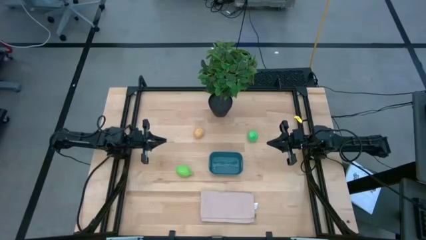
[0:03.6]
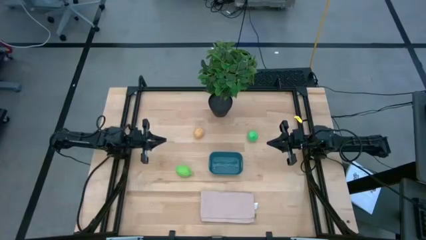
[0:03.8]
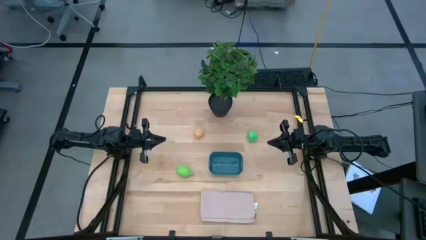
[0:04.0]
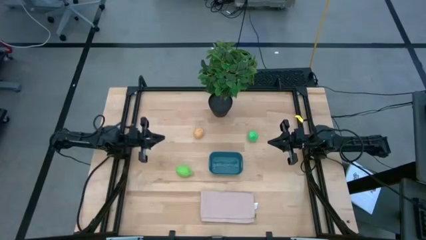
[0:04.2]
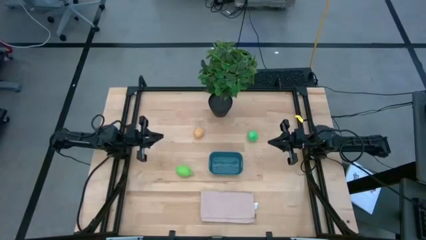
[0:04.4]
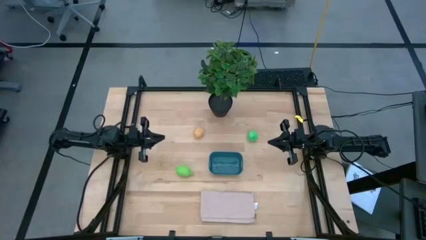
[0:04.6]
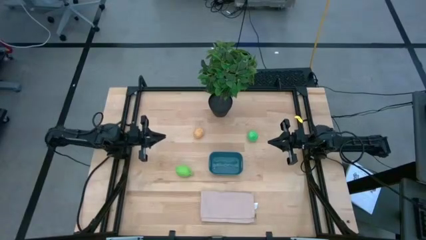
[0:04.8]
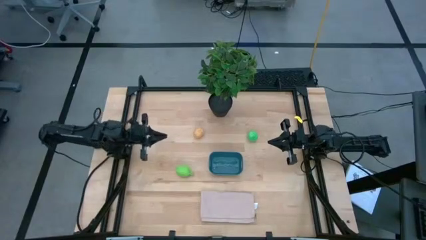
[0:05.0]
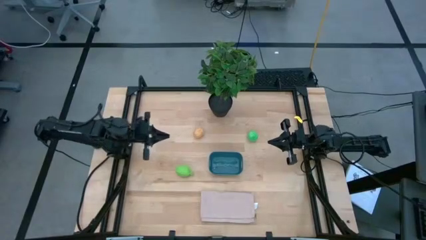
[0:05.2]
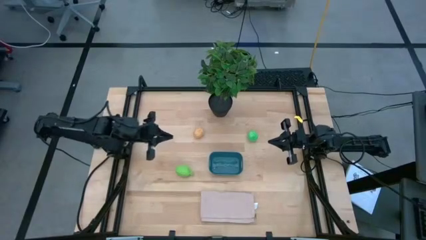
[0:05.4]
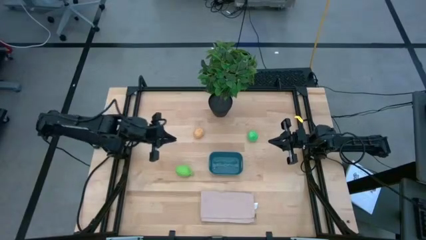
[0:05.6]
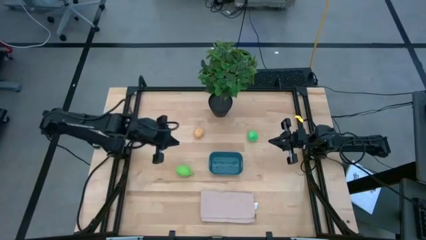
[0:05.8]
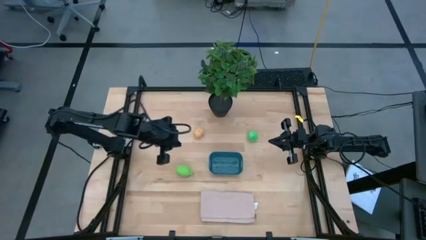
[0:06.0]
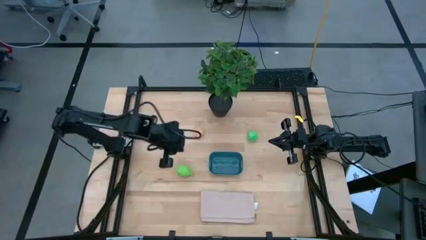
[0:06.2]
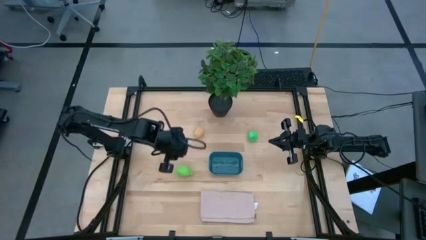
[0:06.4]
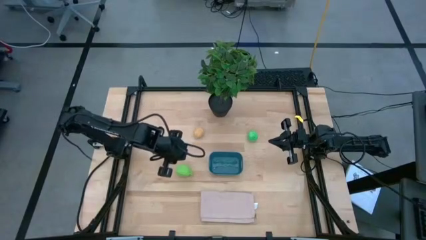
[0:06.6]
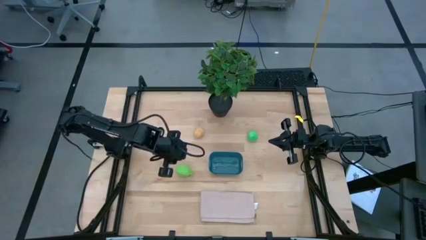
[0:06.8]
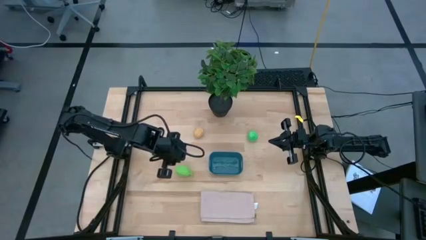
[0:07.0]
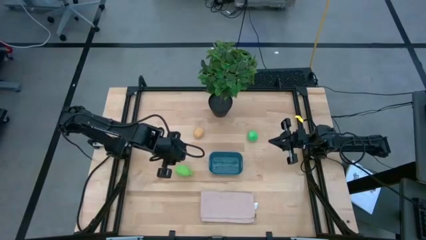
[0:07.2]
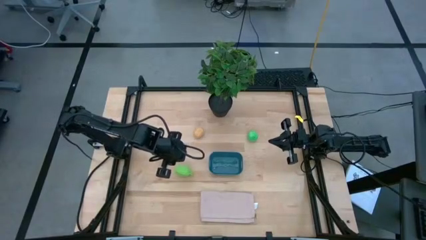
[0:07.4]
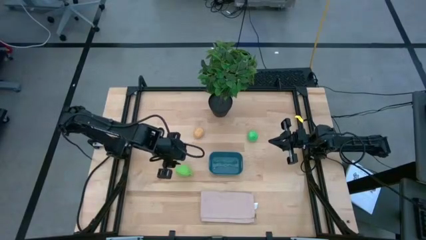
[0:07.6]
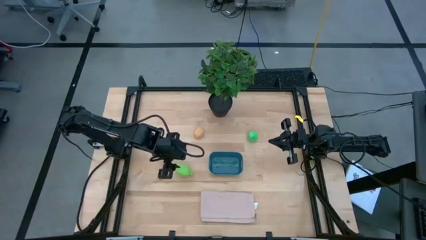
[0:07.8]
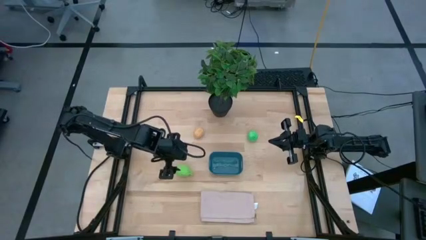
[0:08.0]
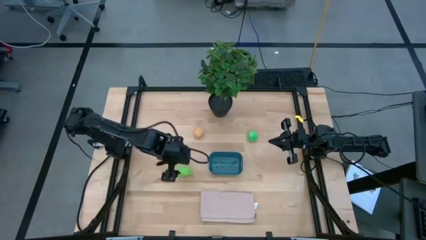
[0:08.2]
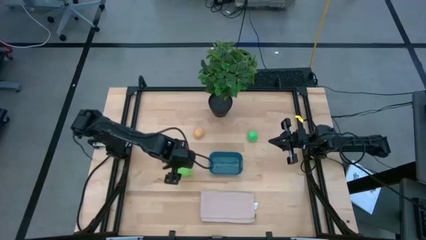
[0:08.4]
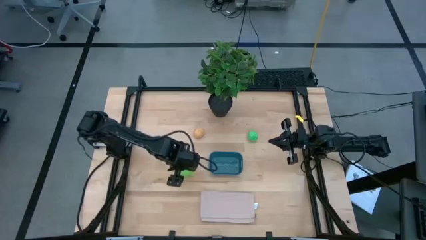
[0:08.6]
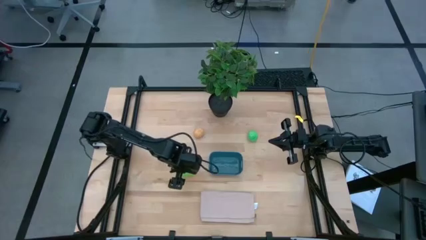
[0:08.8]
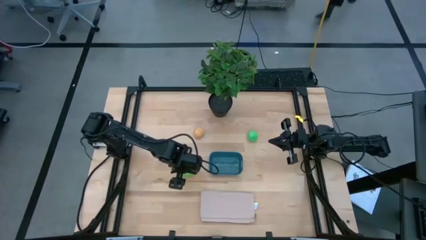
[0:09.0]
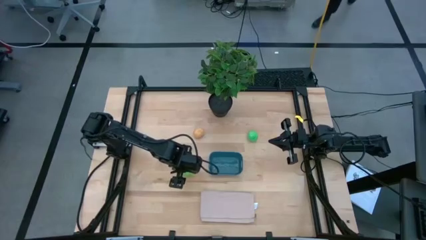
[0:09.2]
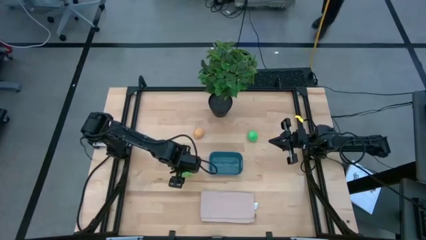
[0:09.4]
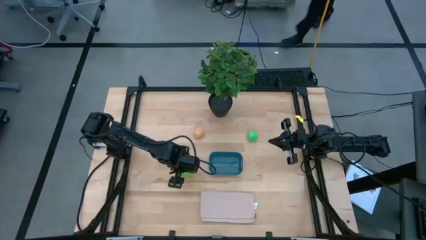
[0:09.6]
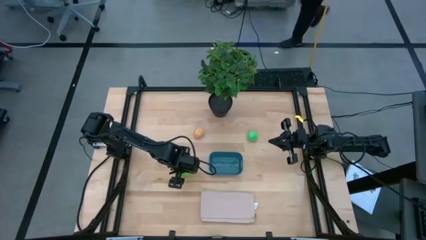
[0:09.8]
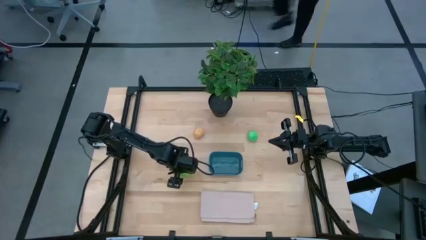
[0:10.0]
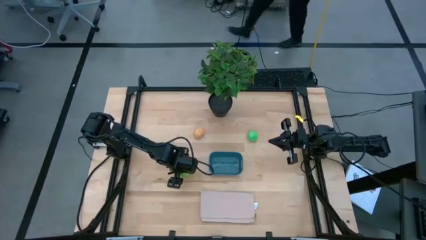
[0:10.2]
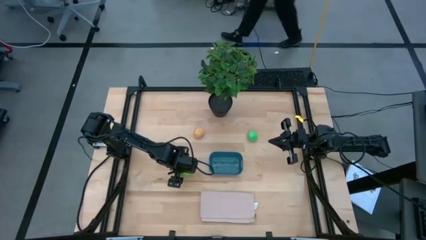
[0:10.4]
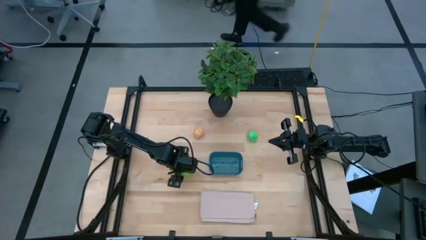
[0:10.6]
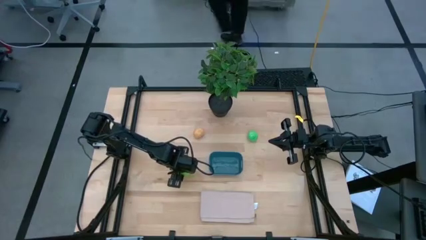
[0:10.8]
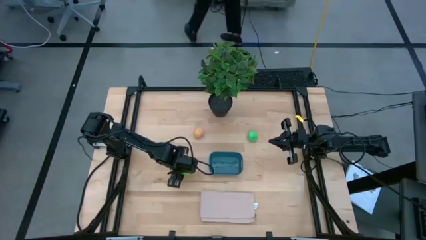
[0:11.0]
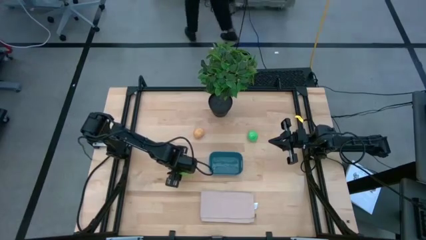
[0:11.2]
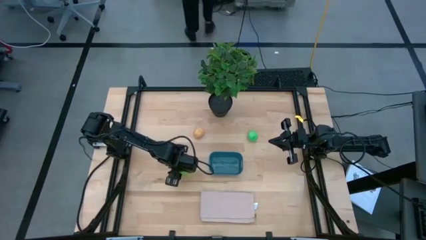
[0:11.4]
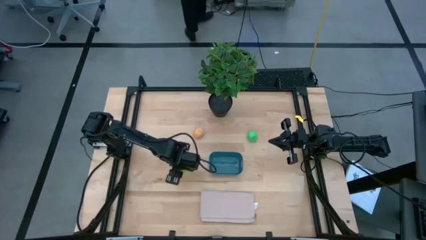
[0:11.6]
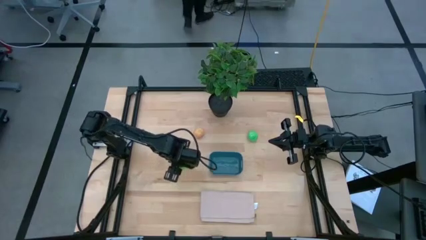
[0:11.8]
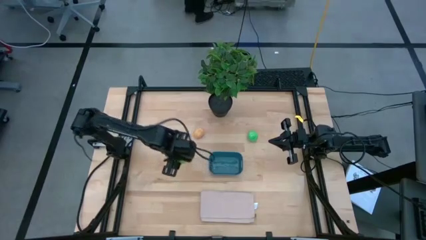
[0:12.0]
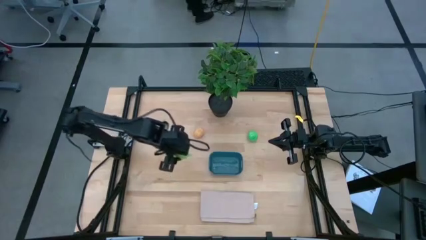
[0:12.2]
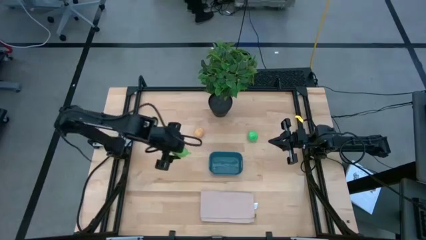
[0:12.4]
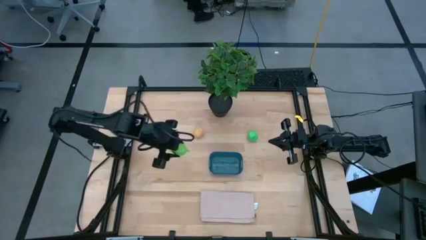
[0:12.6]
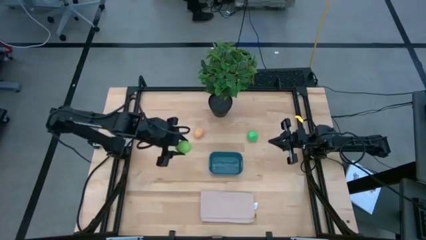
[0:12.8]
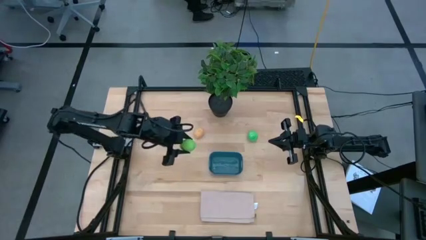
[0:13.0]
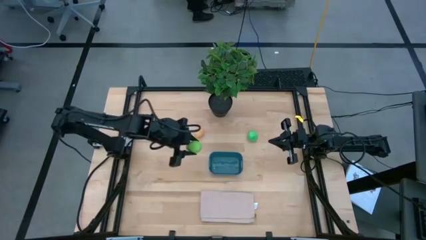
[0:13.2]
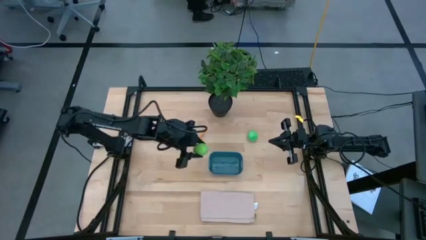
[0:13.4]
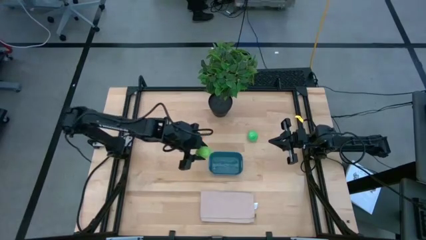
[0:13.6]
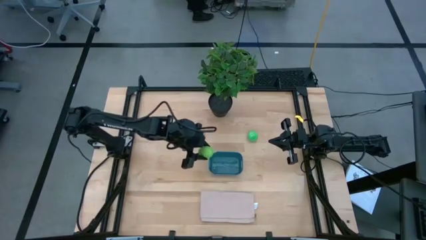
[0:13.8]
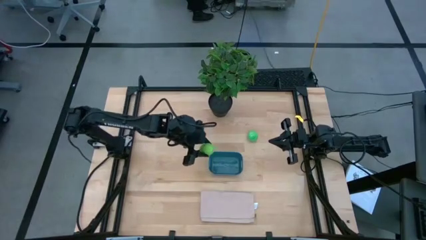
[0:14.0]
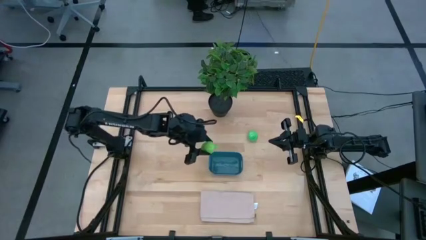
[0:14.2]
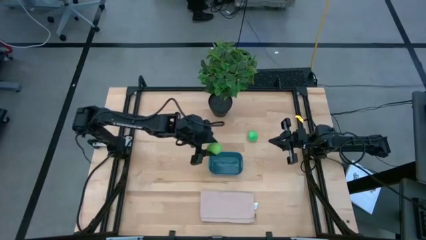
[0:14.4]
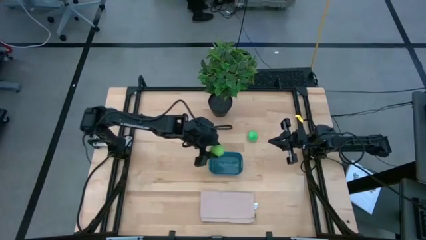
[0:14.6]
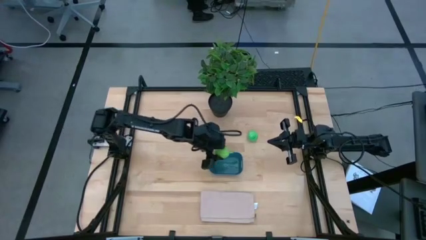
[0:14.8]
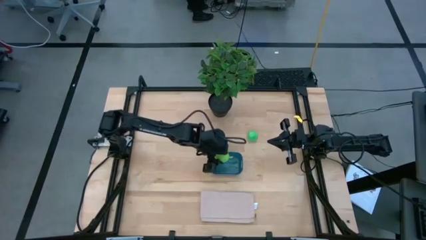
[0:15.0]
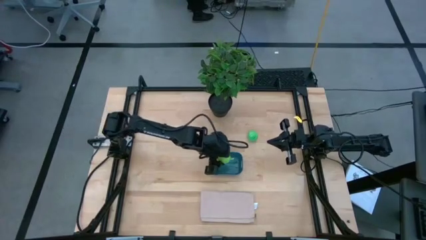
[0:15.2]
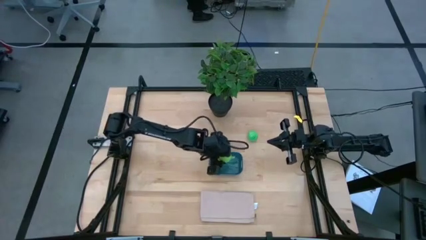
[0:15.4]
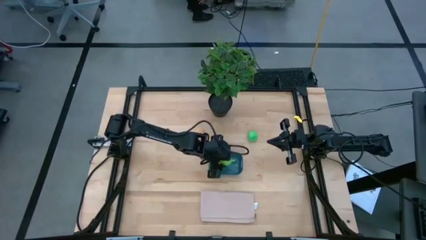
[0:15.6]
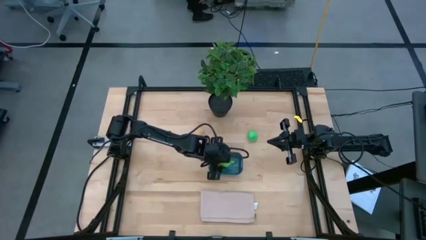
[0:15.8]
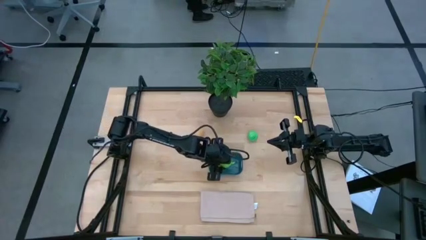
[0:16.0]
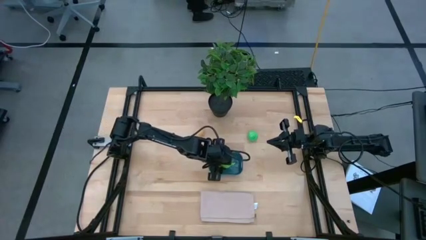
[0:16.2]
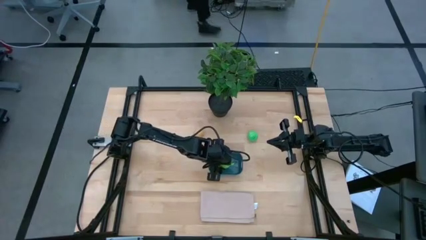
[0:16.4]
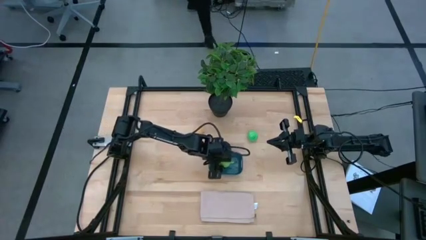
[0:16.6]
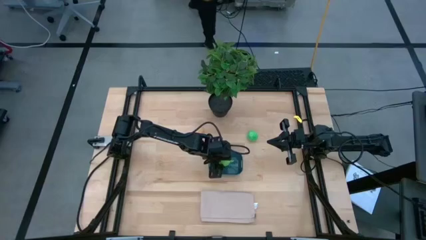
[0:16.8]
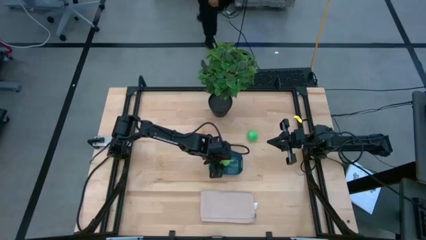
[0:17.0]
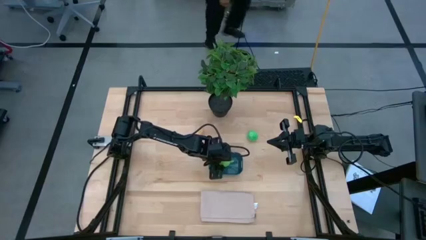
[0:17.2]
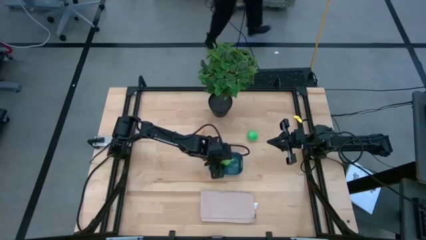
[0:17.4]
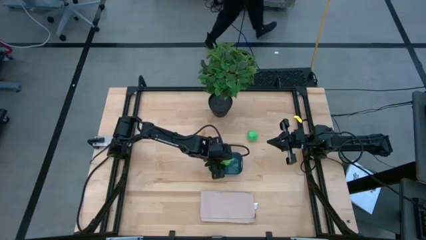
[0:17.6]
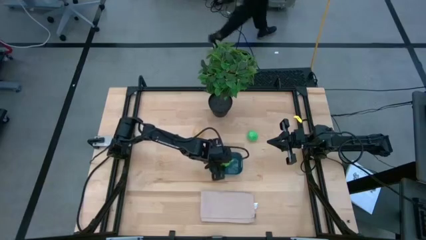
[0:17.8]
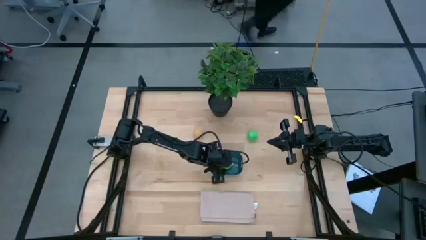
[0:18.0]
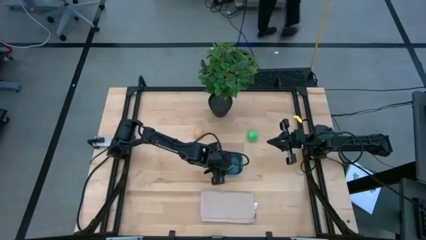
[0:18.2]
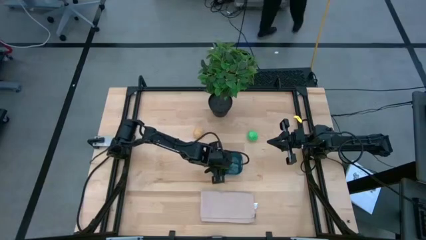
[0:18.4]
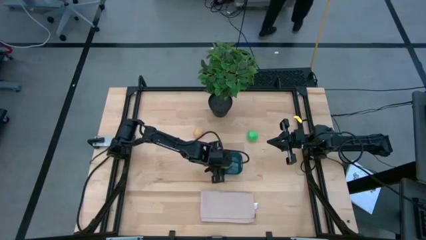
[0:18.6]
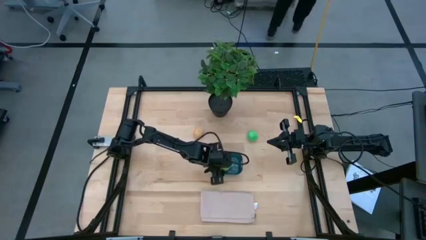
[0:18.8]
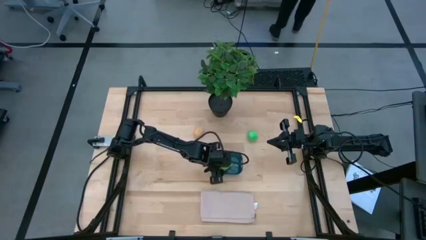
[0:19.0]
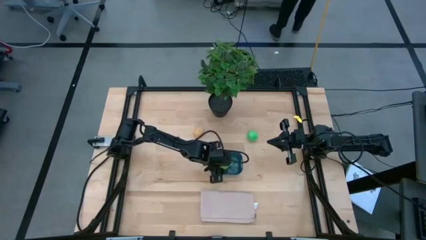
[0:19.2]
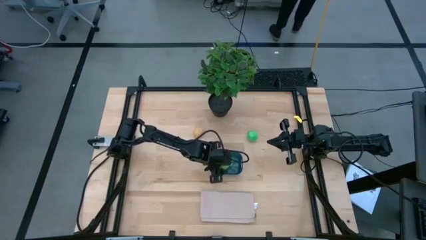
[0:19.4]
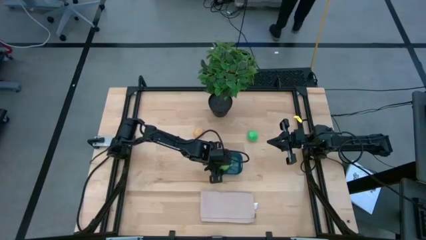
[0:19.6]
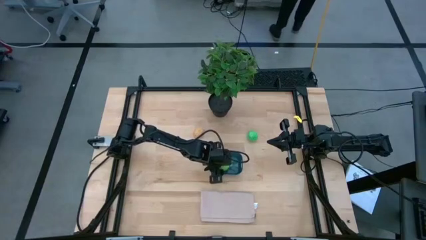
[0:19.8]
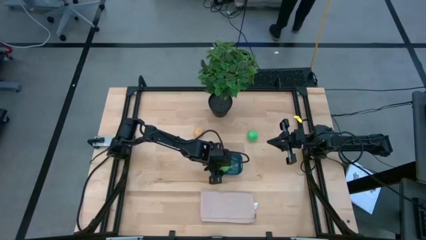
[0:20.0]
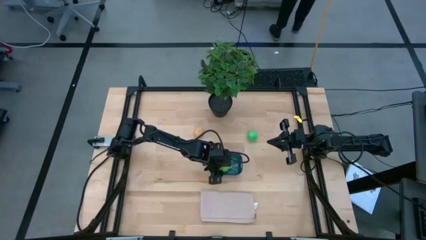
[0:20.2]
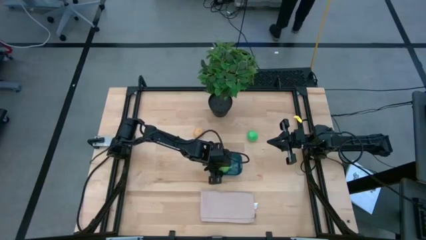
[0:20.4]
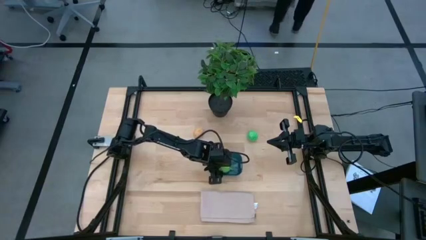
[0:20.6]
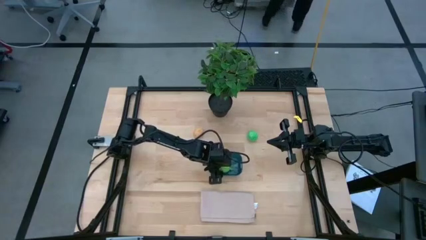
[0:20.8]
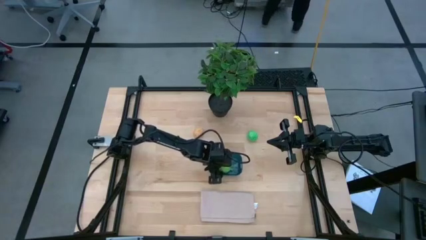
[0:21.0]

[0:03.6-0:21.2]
Task: Pick and placing Produce into tupperware
Put the green melon into the blue bin
